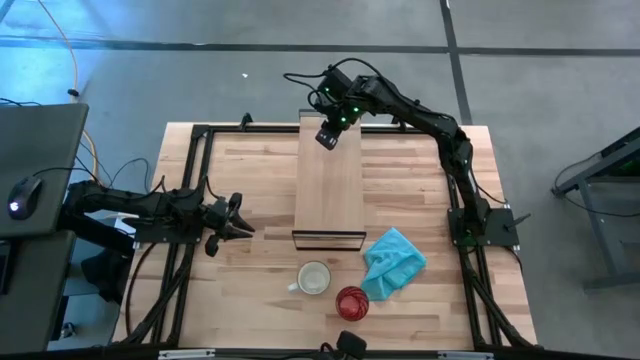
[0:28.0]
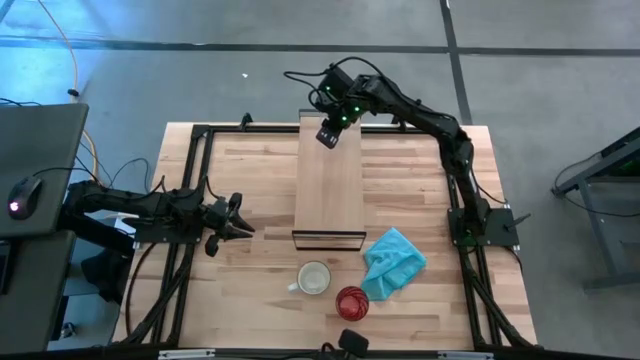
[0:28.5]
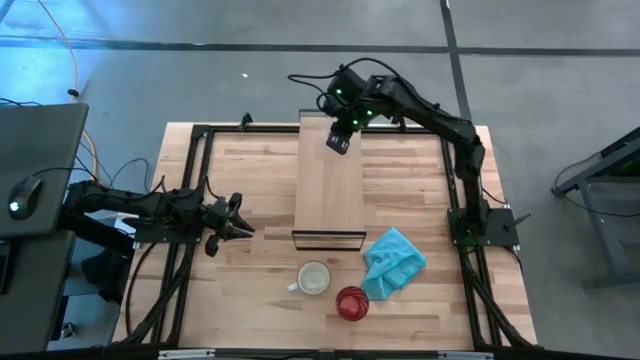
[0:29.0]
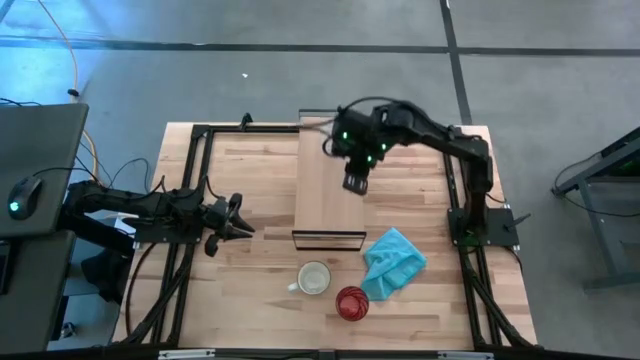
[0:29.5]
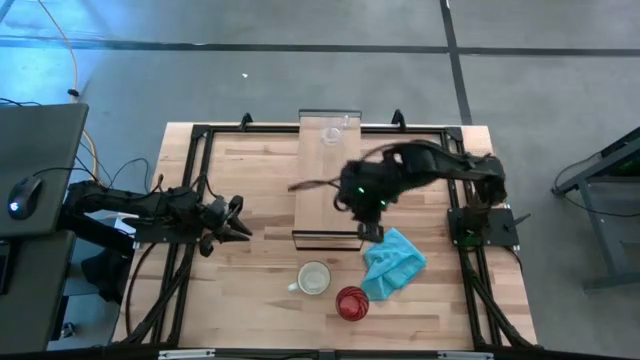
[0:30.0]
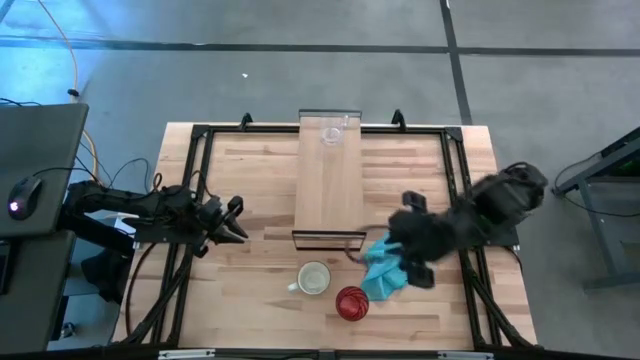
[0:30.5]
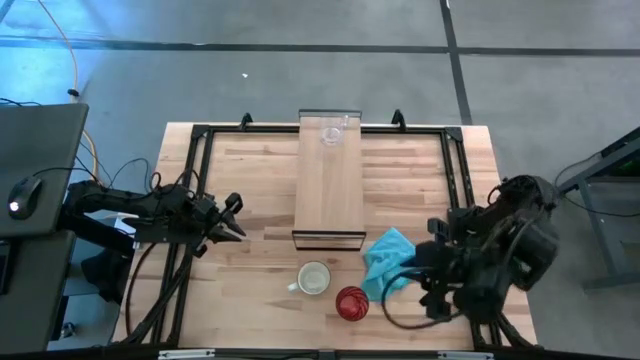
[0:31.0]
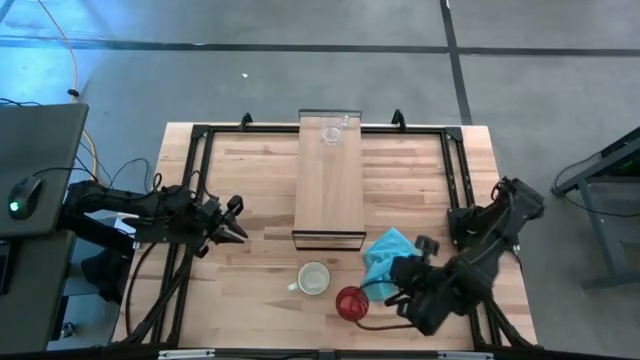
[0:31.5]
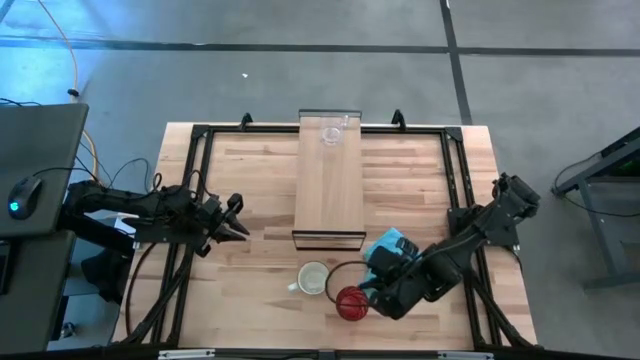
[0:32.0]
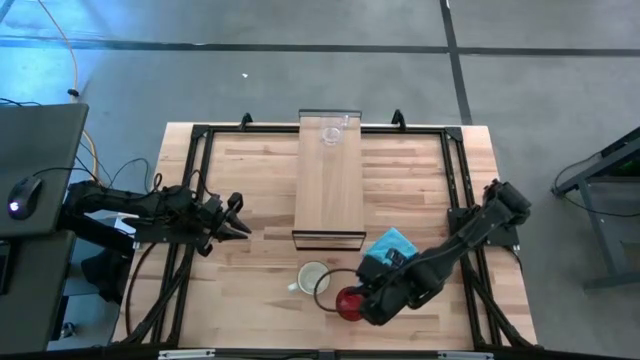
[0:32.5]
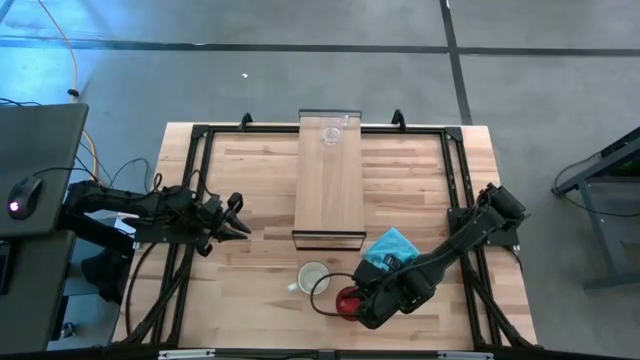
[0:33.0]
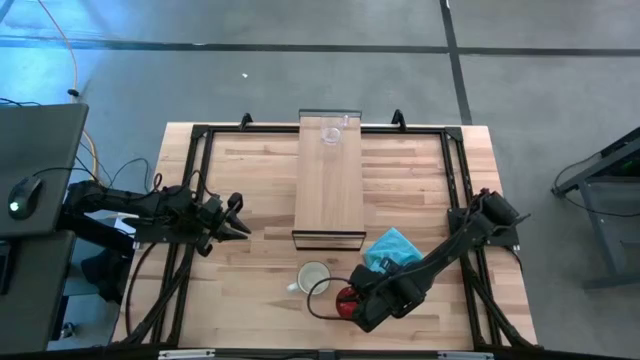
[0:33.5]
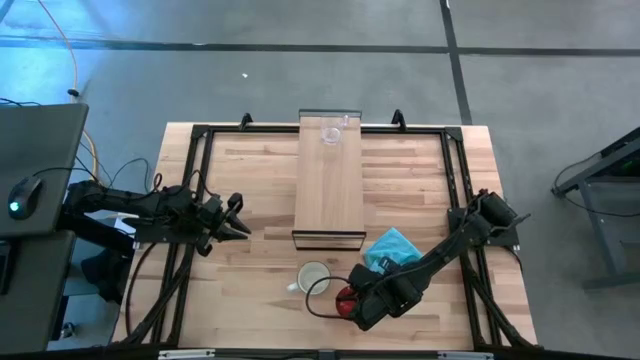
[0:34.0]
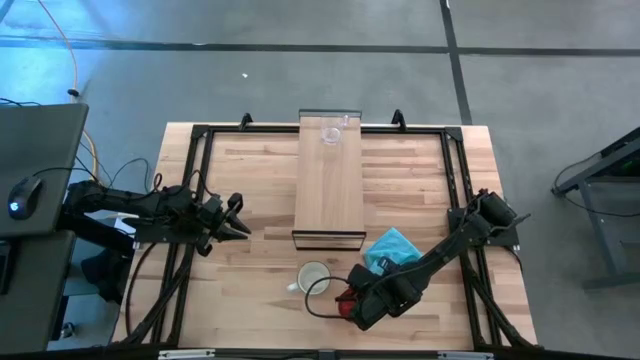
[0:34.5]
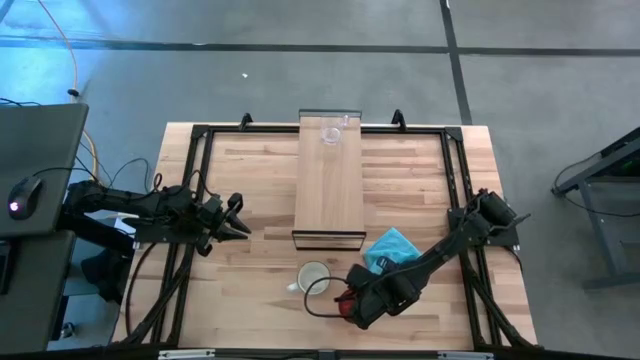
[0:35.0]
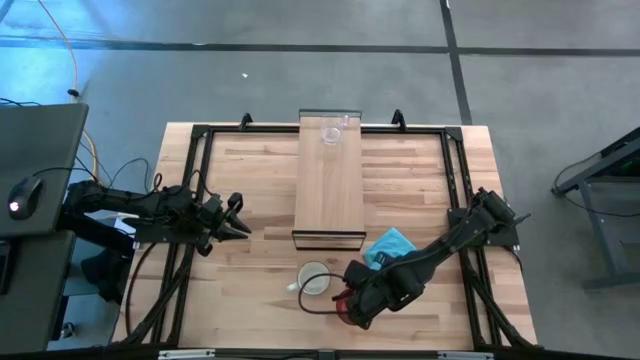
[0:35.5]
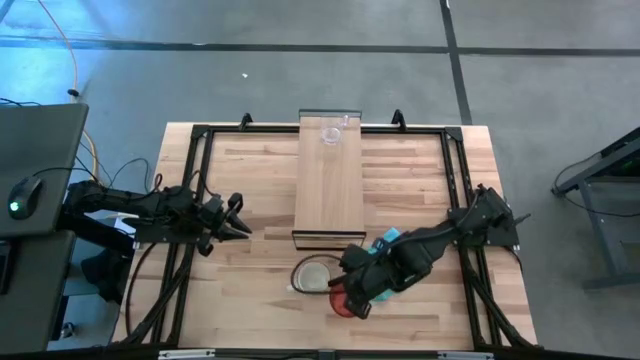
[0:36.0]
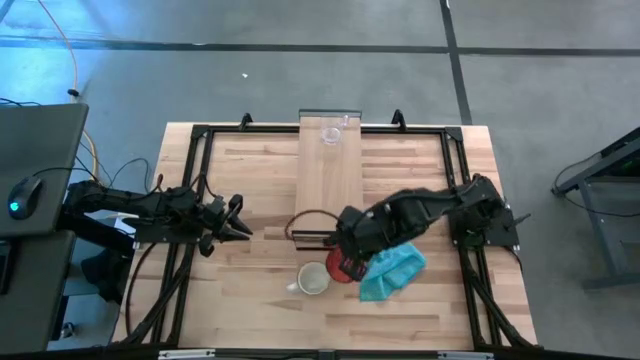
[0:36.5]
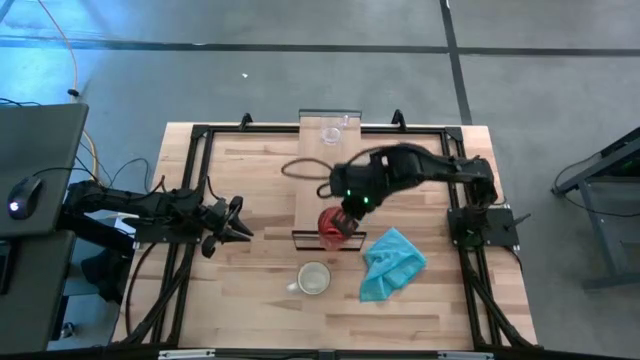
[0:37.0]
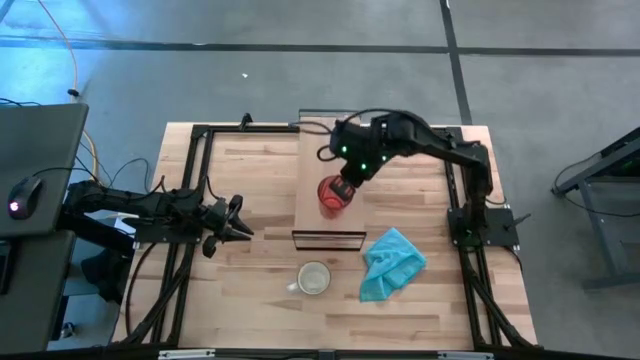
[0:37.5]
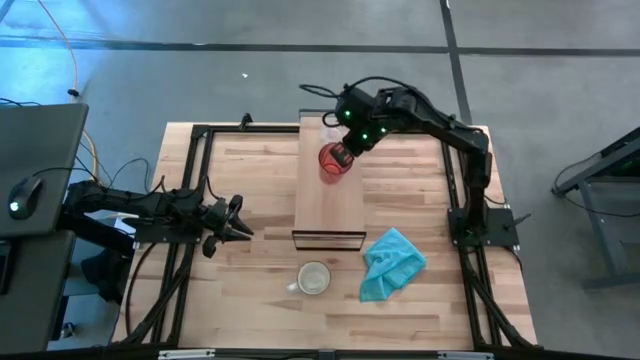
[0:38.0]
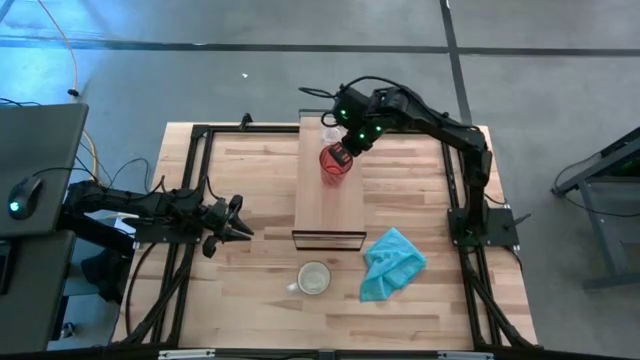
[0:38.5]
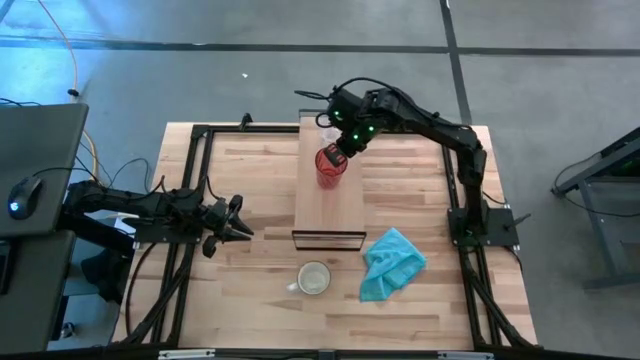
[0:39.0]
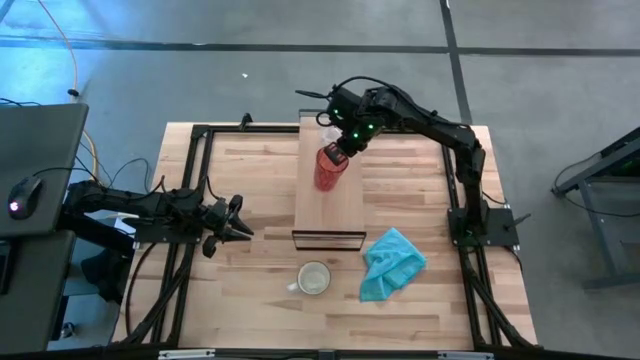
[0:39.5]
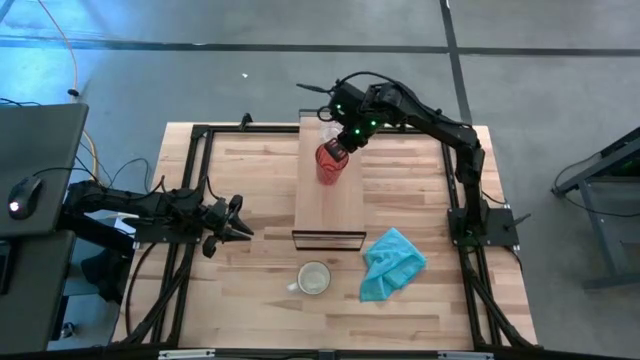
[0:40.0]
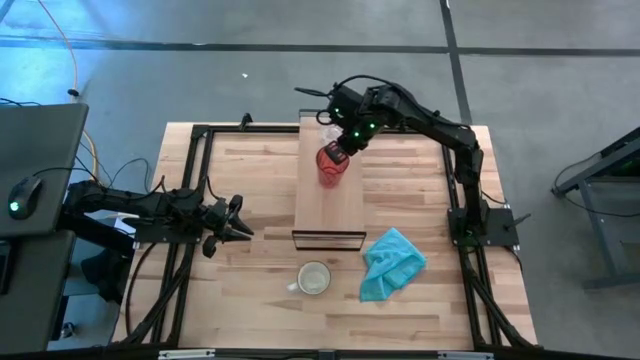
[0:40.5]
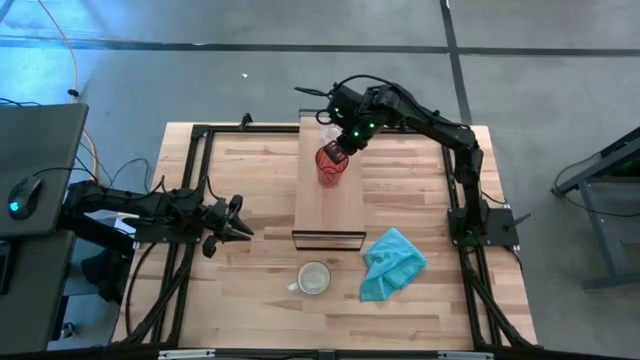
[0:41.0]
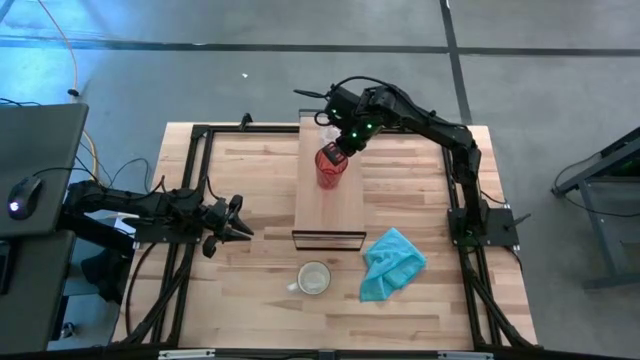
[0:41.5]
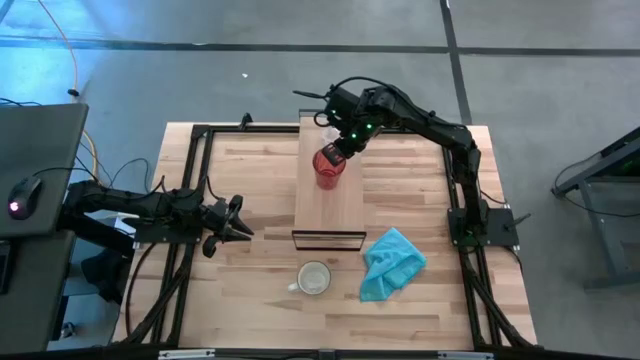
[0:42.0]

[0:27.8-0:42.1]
Task: Stack small to large cups/mugs on shelf
Put the red cup on the shelf

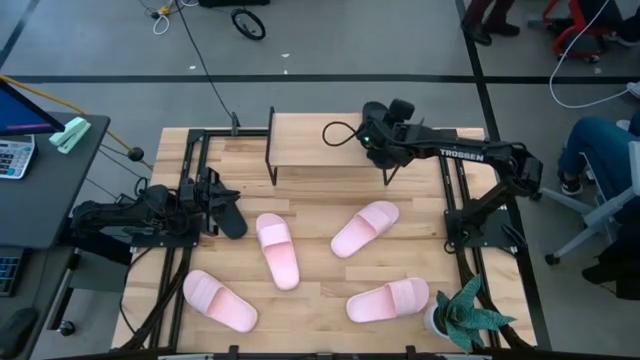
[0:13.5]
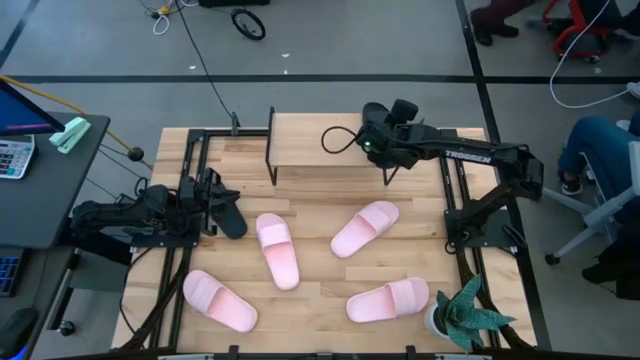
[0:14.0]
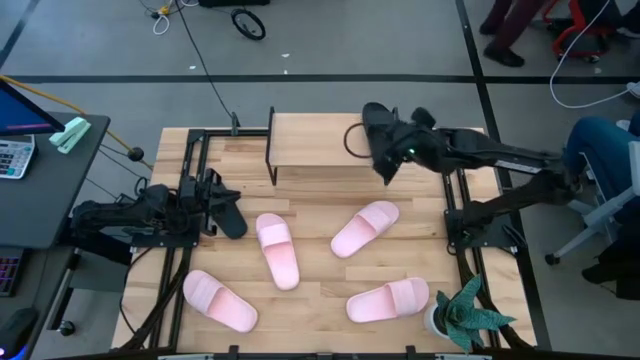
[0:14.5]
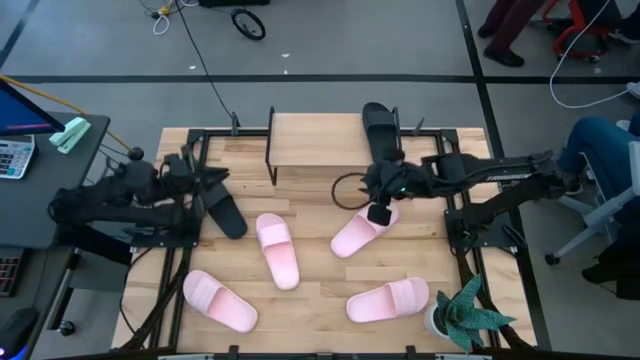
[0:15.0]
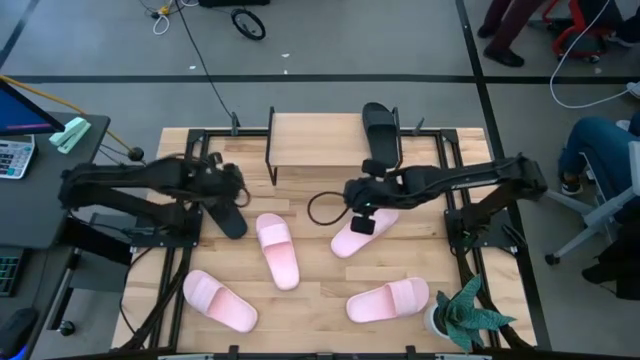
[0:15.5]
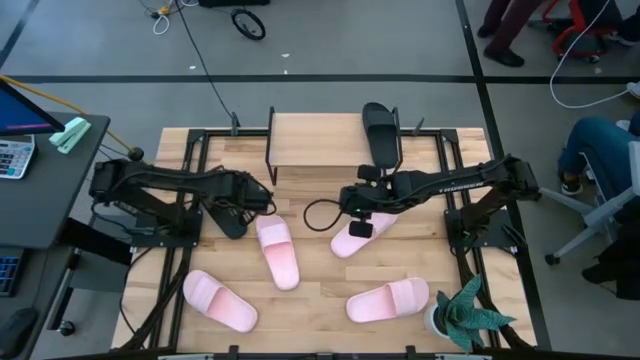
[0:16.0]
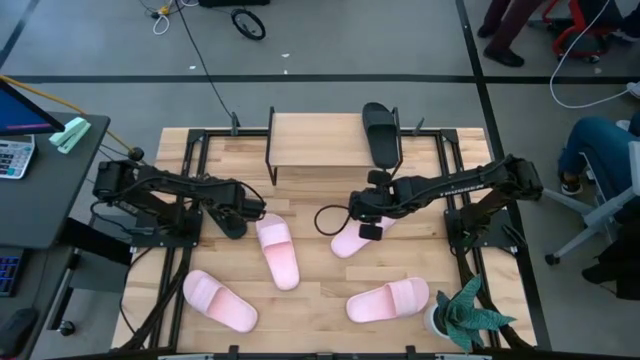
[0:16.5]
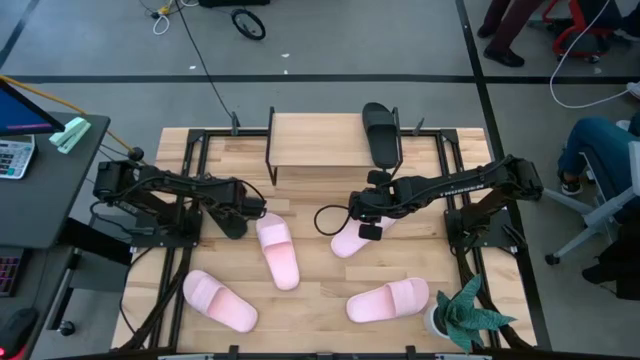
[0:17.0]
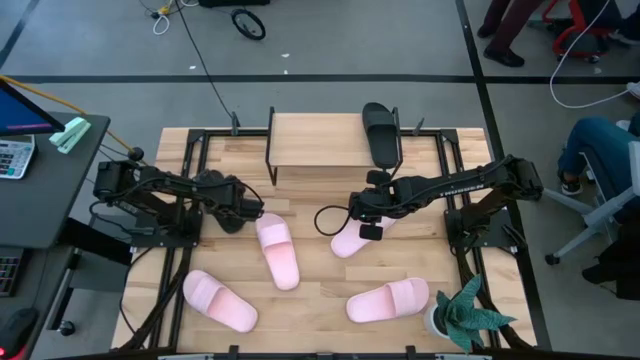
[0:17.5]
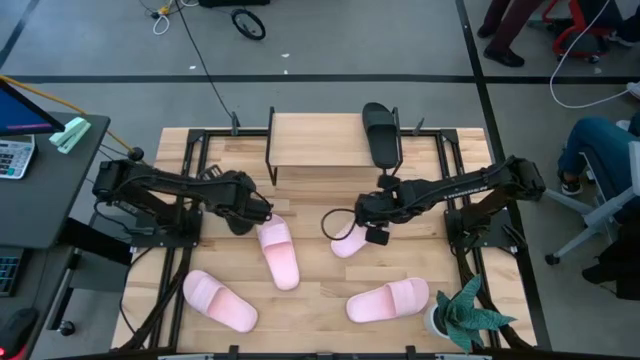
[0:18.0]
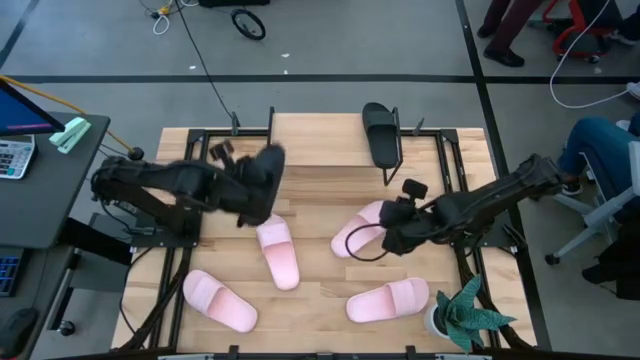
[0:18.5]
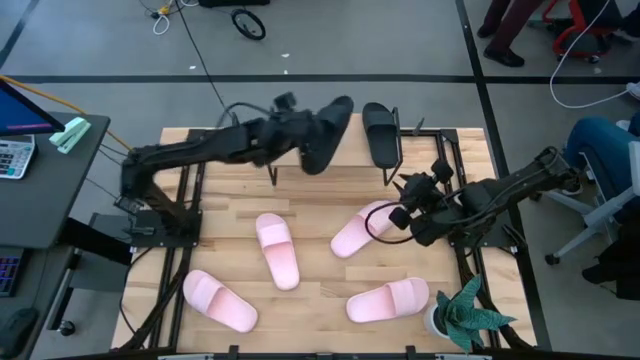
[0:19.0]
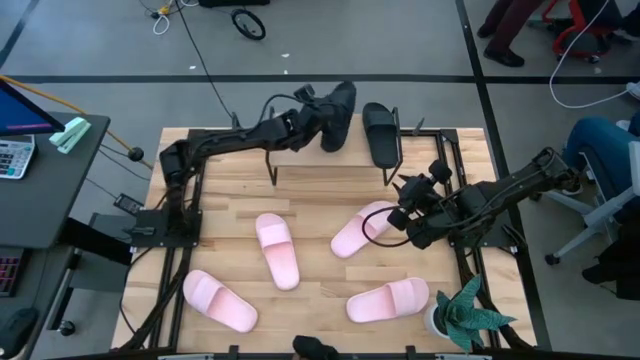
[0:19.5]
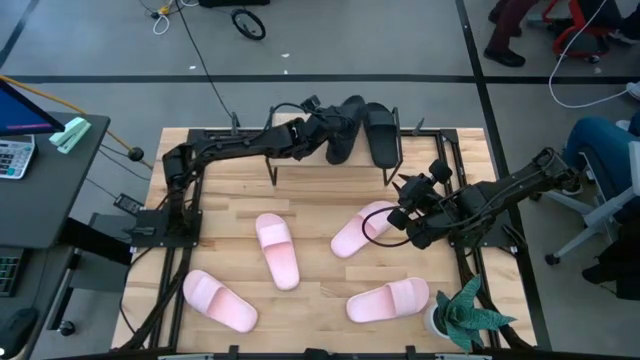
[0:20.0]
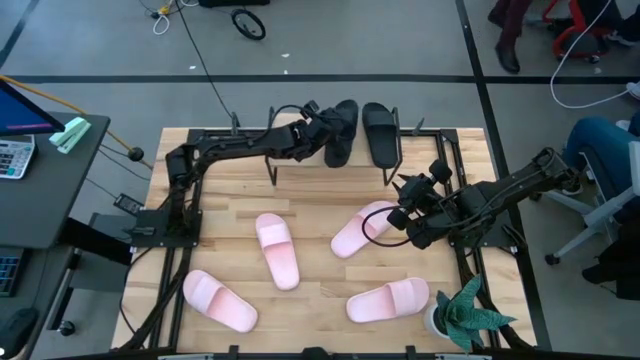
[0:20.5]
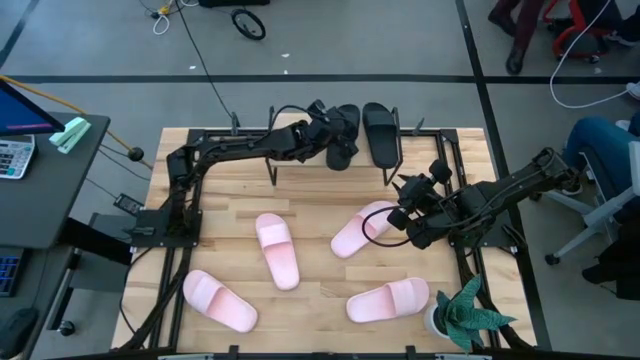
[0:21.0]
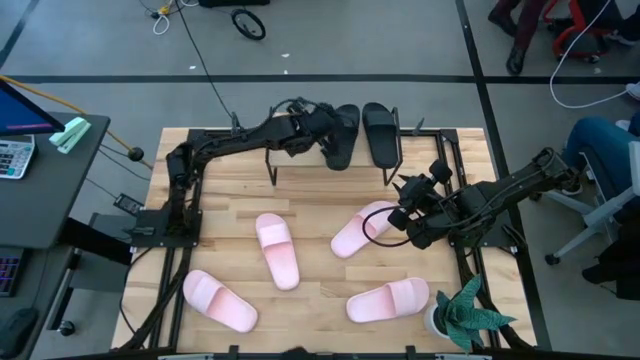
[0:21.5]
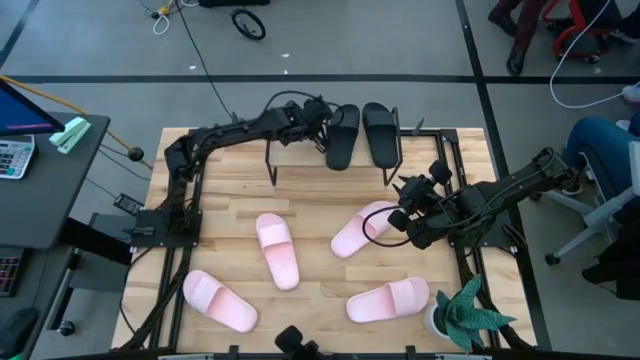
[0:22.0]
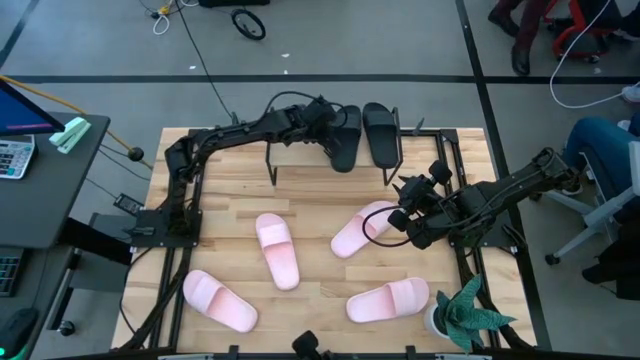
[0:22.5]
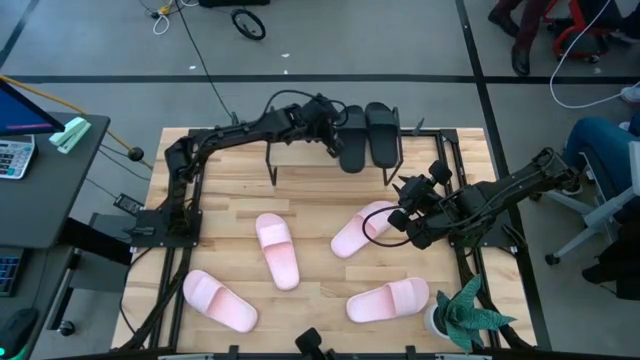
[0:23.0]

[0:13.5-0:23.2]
Task: Pick and place slides into the shelf
Put the black slide on the shelf
